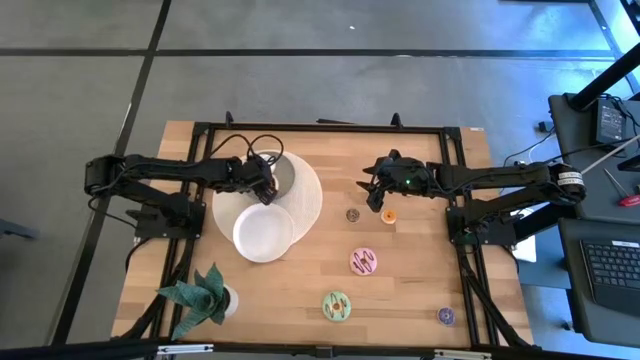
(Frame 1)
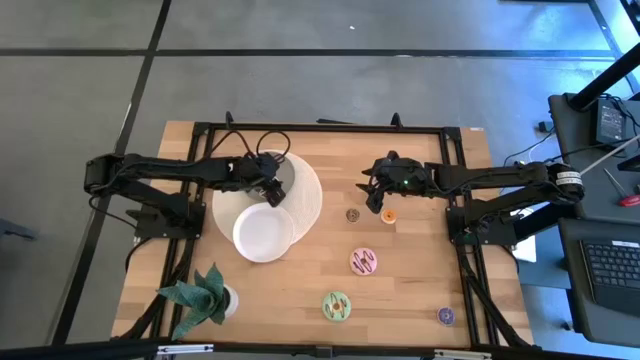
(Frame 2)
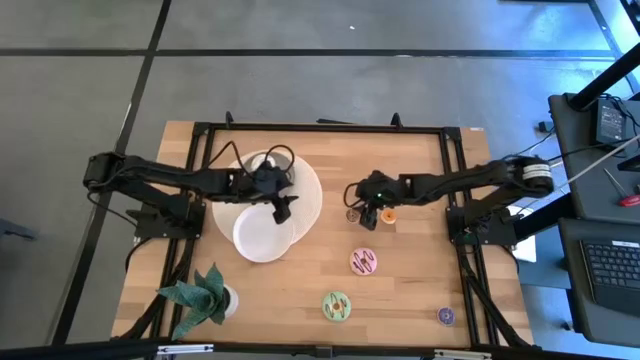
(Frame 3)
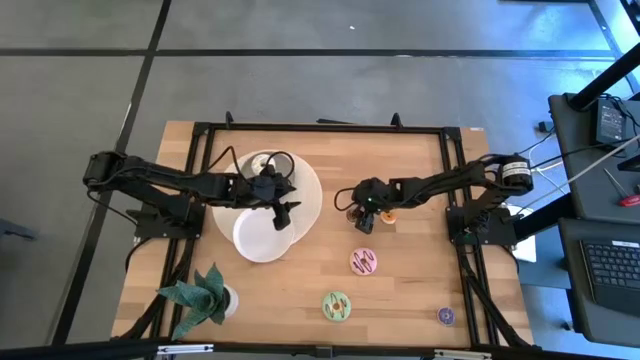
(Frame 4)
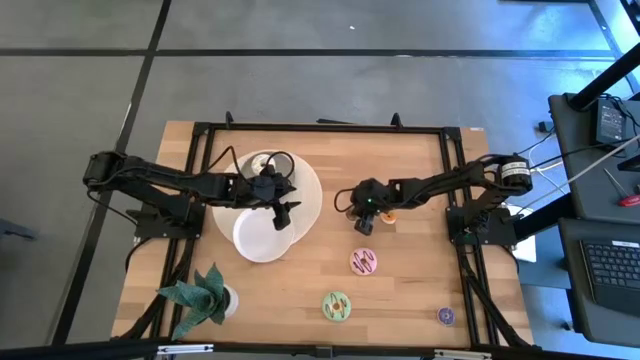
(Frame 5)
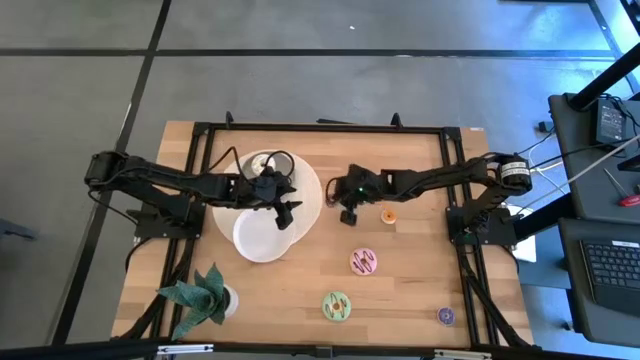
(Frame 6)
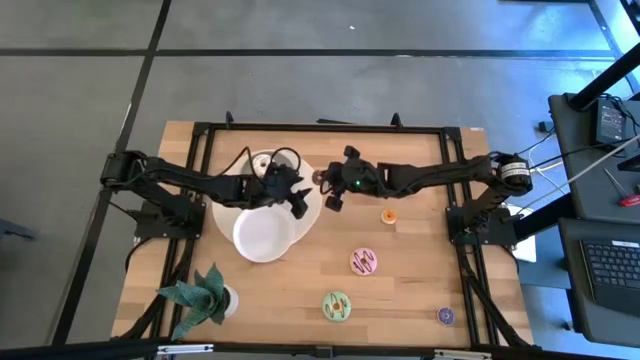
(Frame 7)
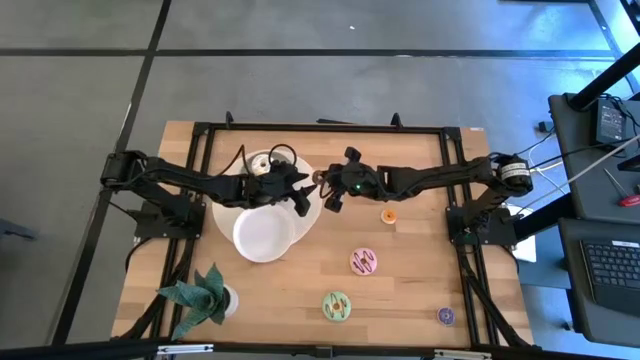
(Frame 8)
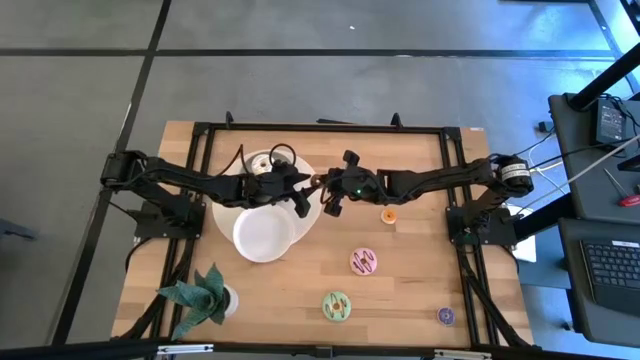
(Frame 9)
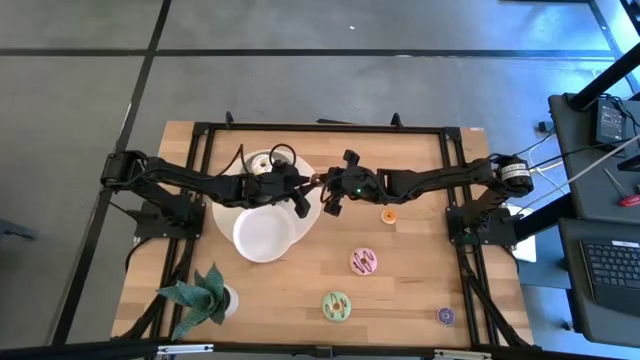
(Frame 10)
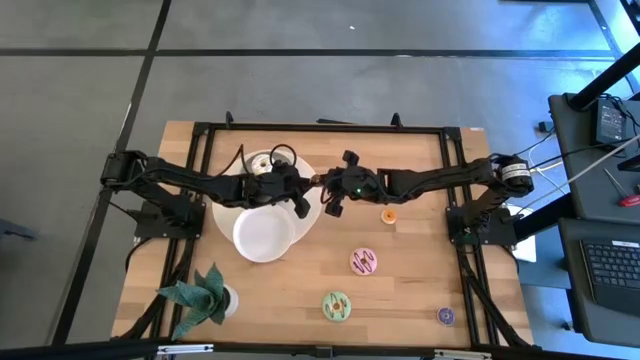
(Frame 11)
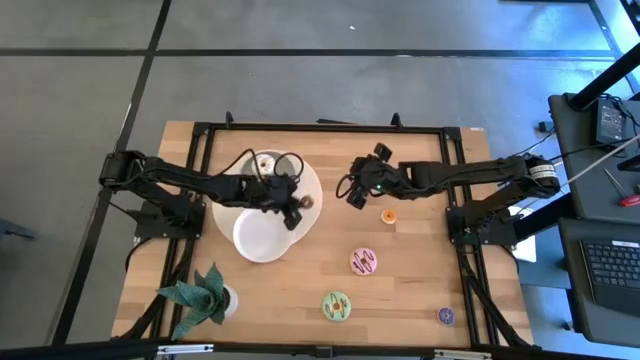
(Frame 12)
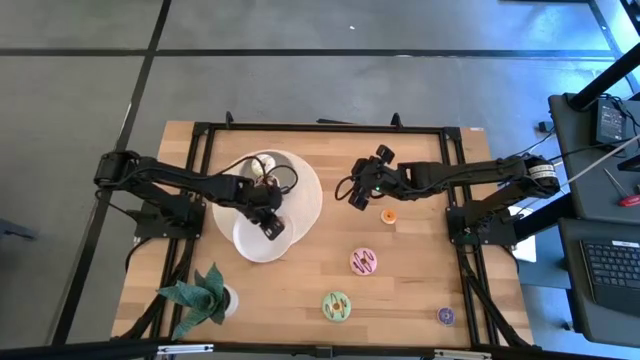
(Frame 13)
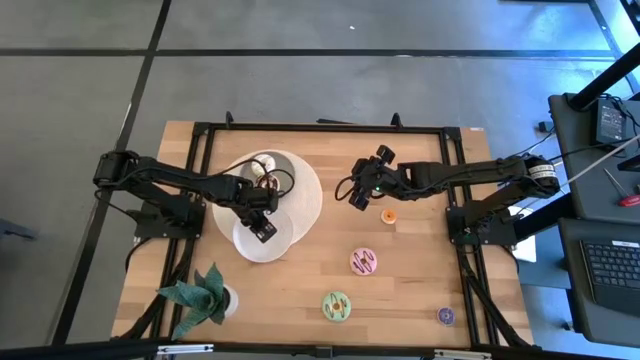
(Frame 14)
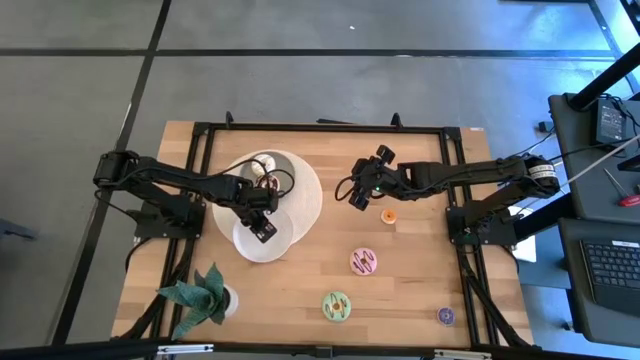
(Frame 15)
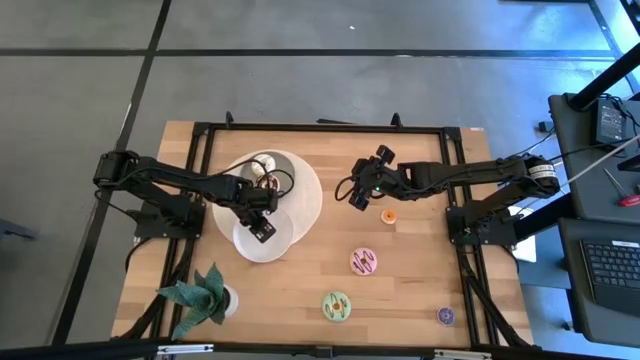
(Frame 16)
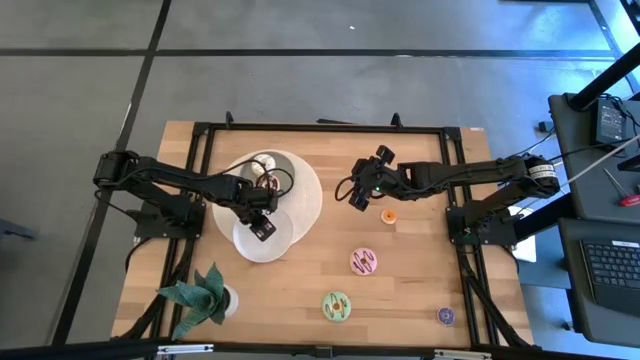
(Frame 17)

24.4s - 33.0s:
Task: Pick & Place donuts
Put the small brown donut on the white plate

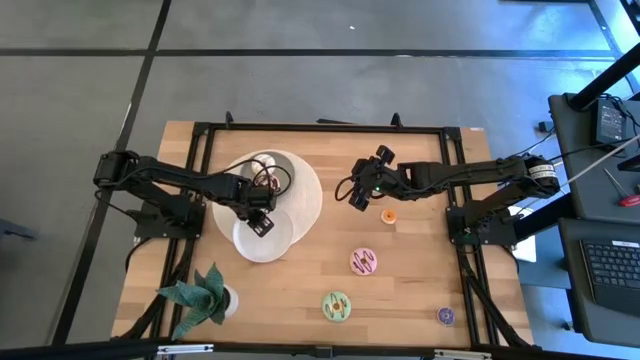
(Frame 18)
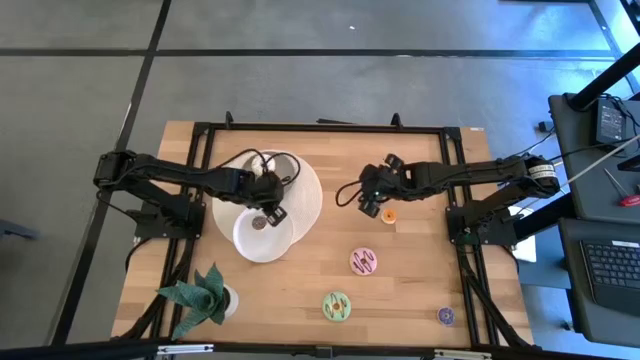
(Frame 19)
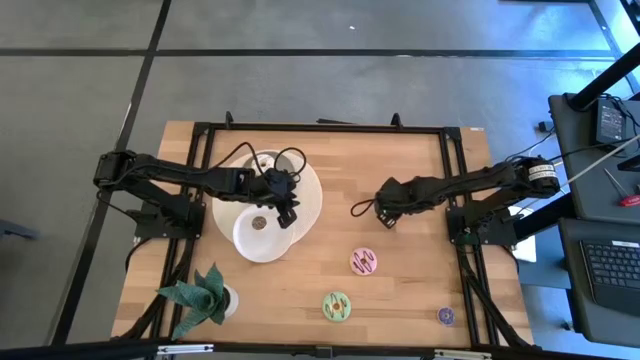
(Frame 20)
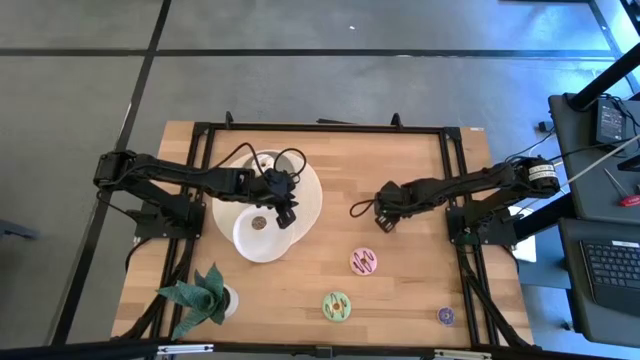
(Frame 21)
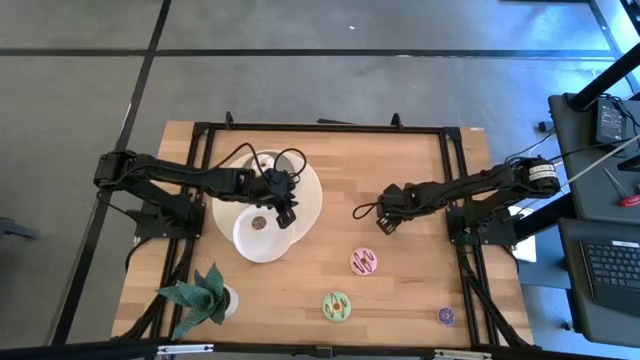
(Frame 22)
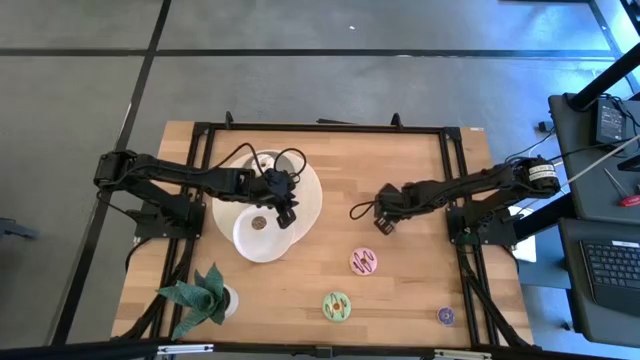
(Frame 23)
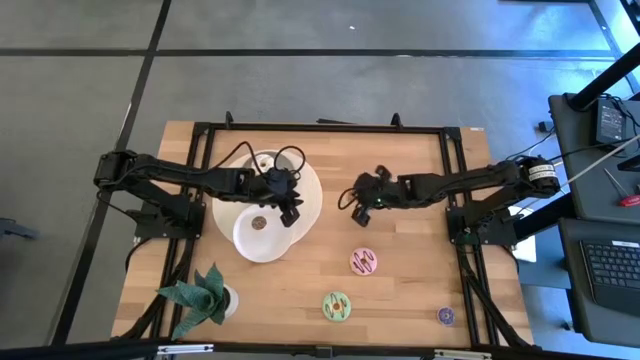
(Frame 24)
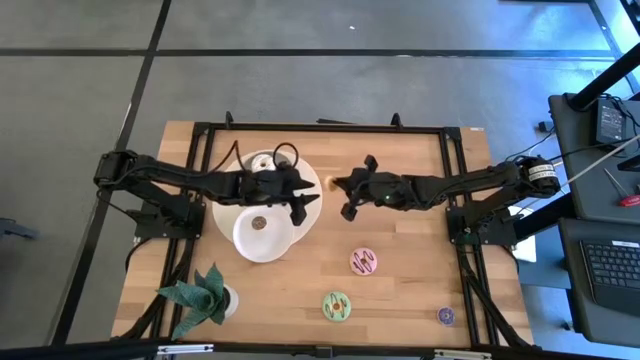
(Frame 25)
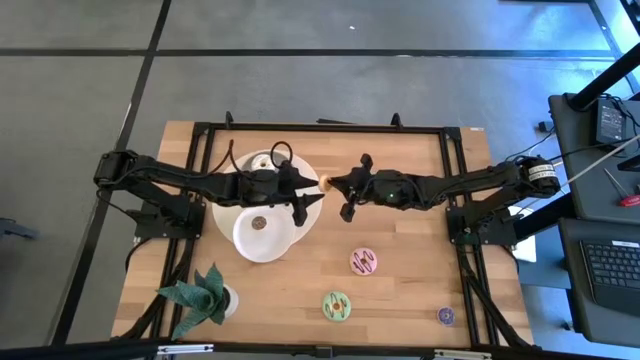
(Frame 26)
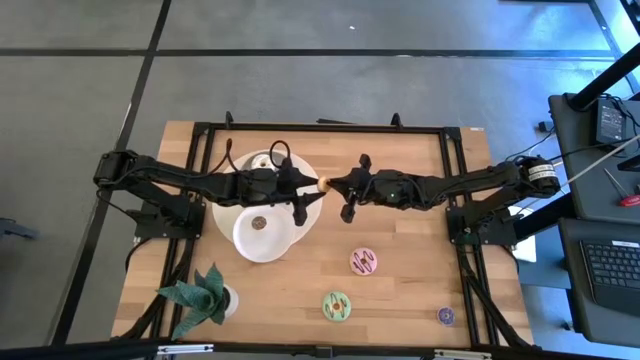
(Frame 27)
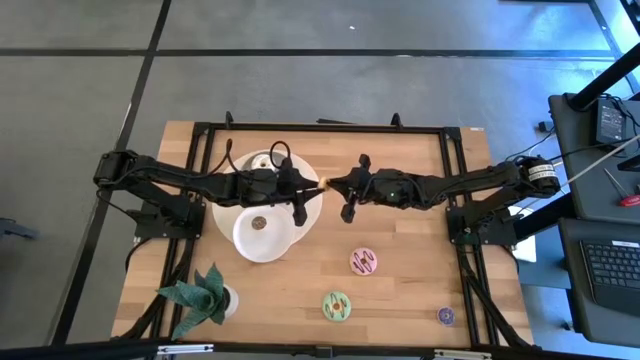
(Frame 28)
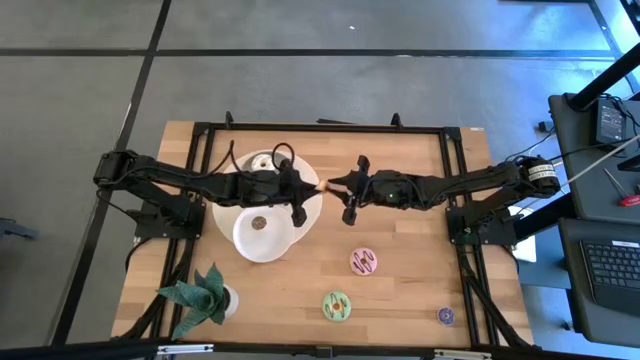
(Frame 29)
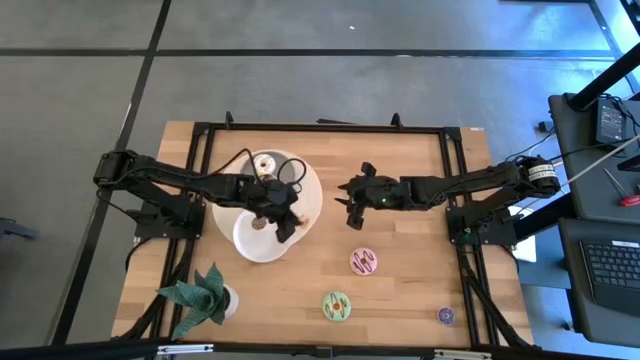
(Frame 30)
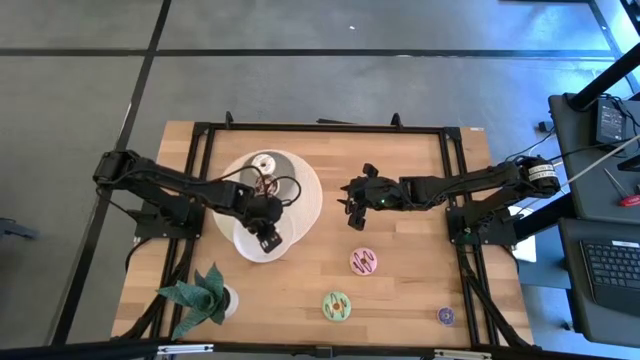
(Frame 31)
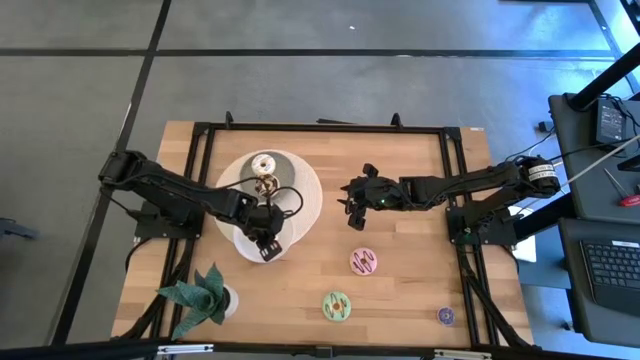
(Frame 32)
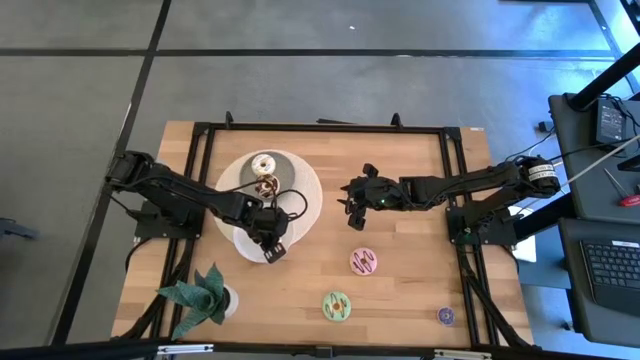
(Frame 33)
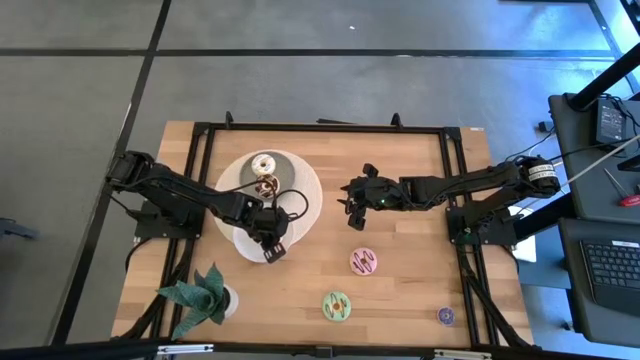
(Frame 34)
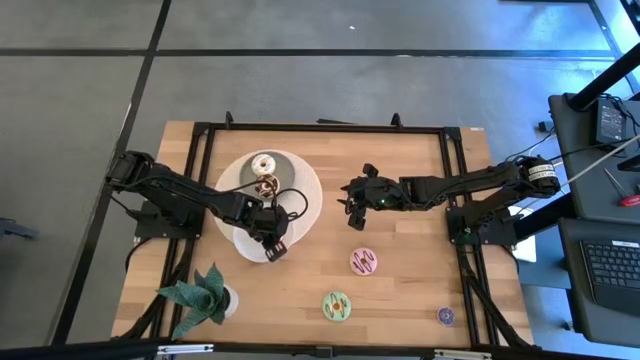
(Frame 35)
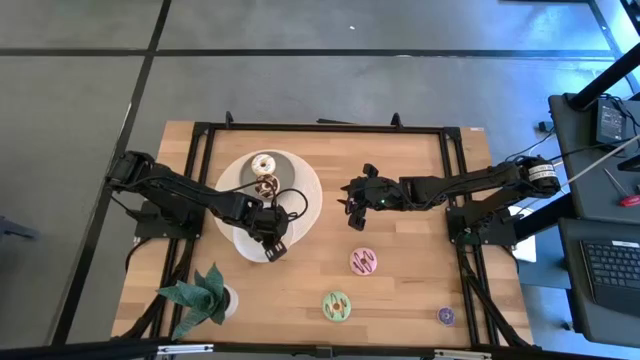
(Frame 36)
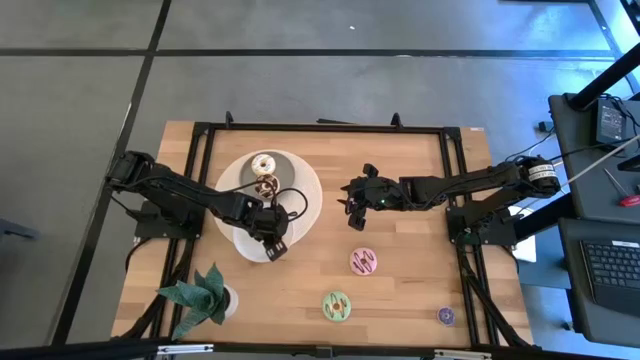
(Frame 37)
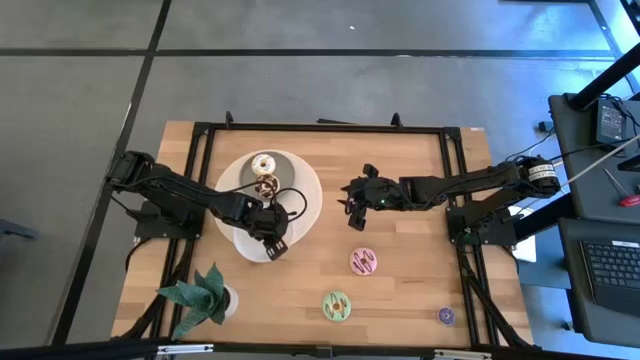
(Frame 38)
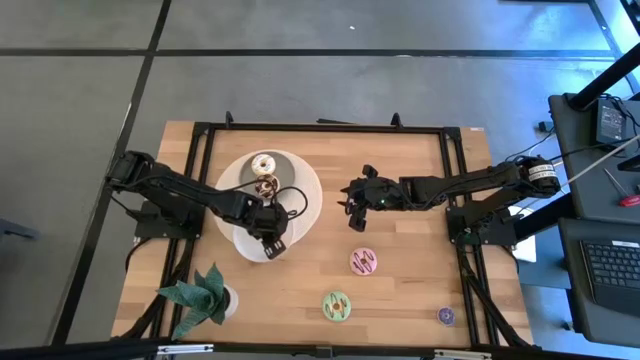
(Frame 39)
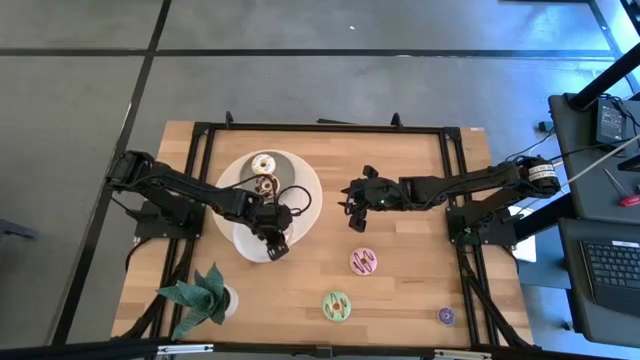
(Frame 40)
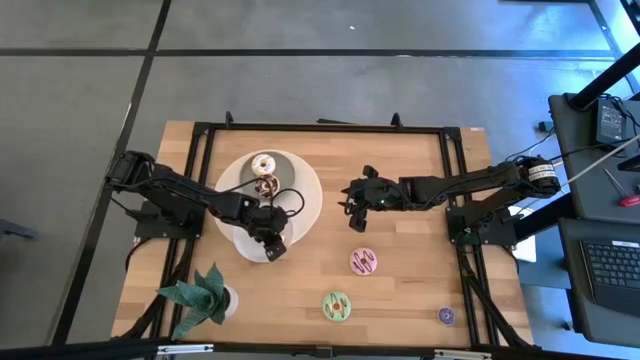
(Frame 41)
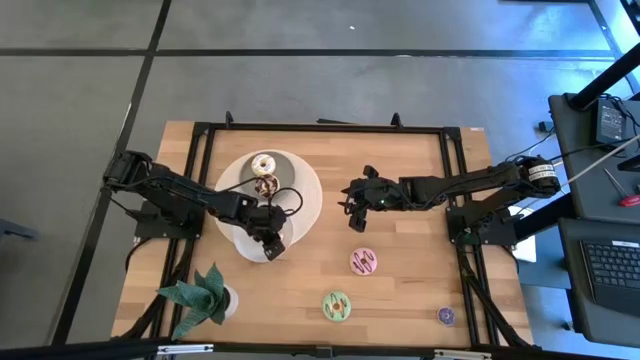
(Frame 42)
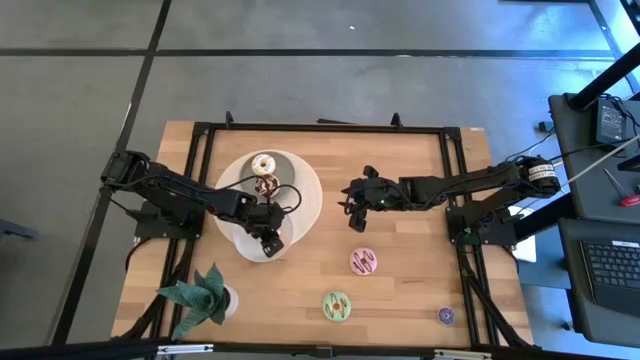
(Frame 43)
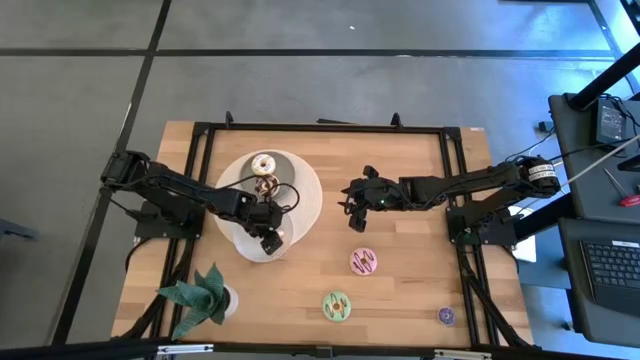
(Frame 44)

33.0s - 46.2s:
Put the small yellow donut on the white plate
